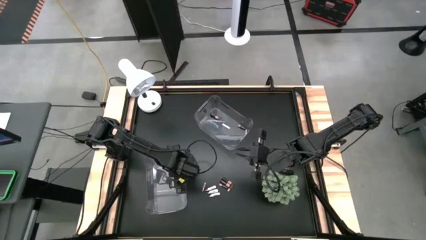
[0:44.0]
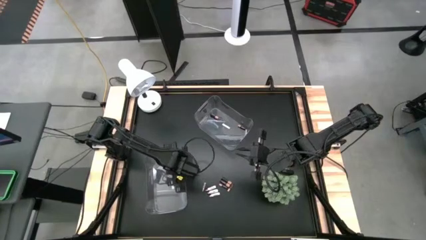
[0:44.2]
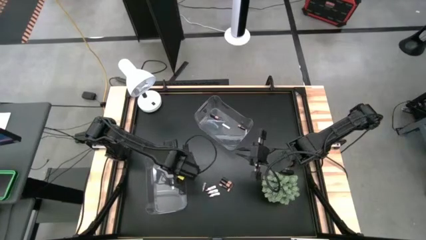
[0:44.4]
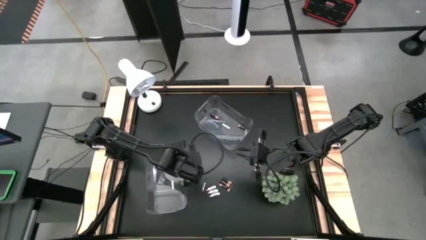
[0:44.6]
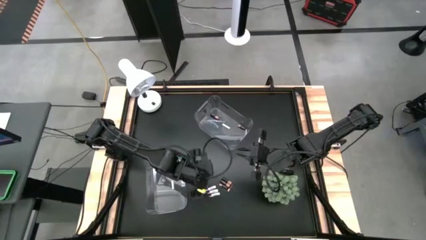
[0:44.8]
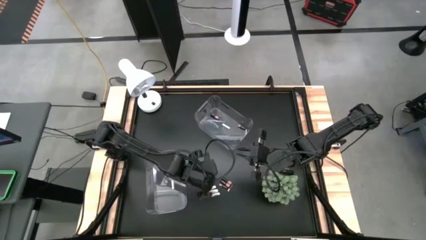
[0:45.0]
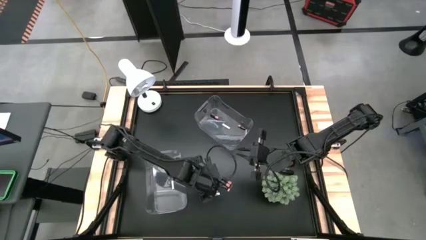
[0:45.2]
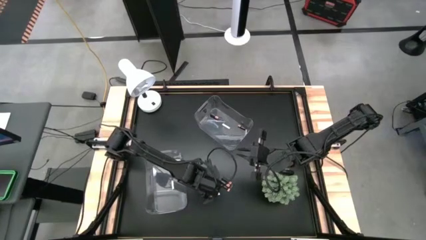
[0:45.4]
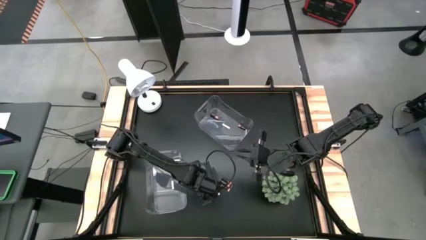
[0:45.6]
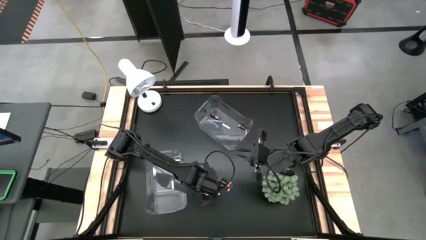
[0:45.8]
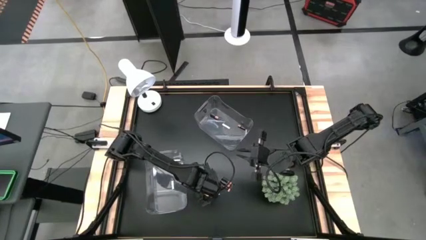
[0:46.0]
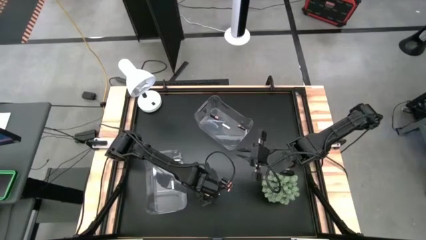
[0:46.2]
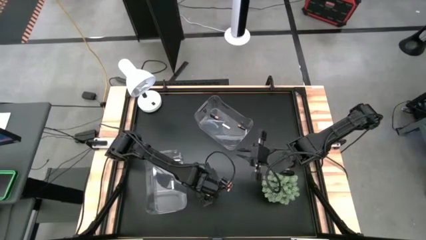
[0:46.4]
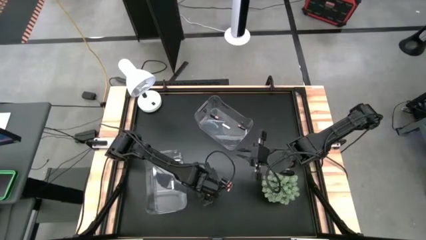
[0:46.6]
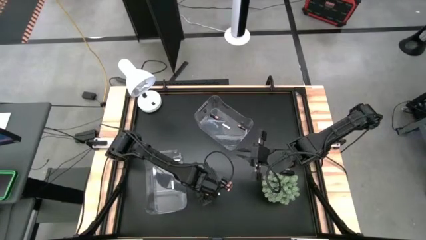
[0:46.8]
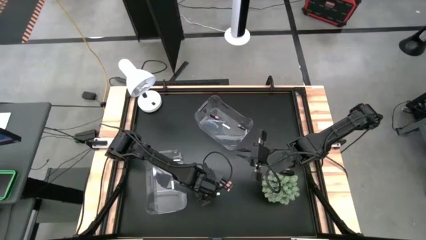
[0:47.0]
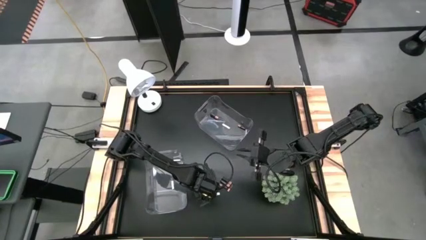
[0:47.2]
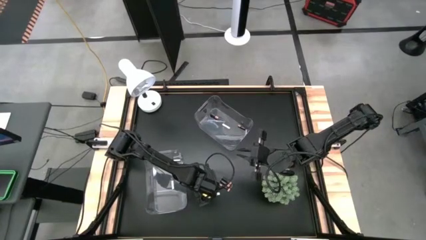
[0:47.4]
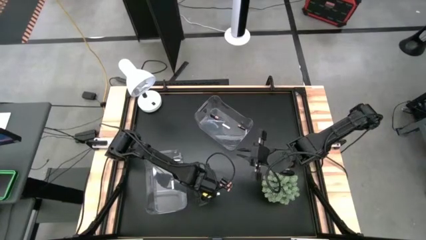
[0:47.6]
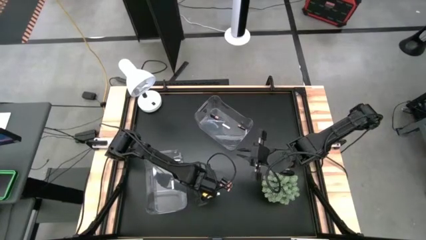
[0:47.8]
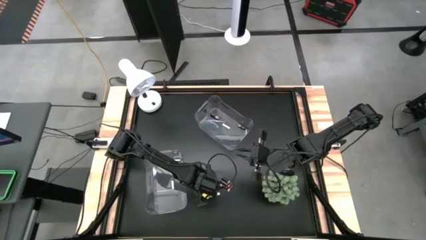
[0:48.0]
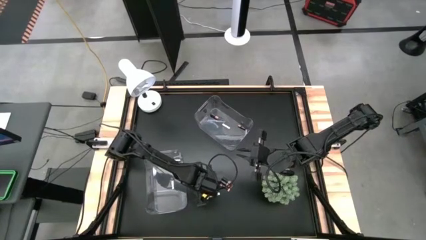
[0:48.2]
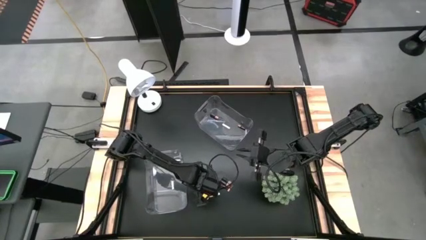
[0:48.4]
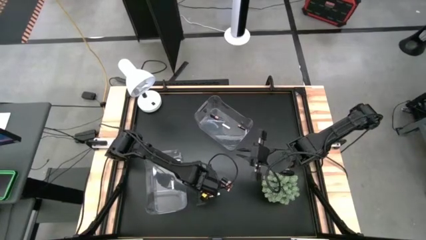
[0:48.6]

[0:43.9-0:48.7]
Task: Sort batteries
Put the silver battery into the bottom transparent bin

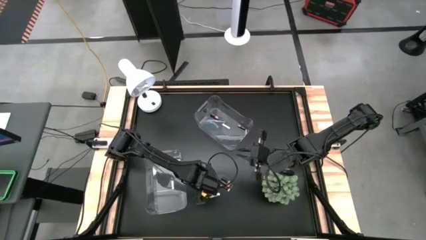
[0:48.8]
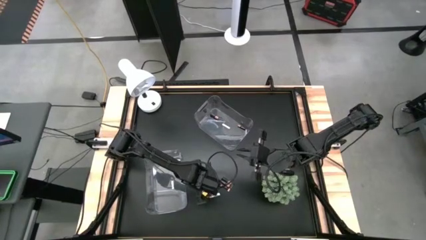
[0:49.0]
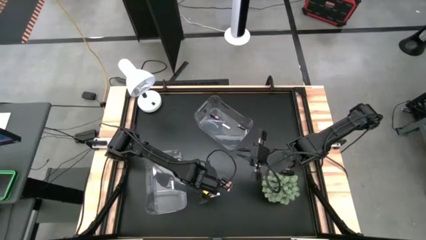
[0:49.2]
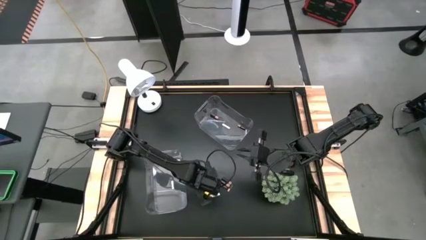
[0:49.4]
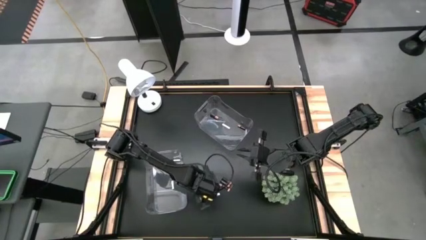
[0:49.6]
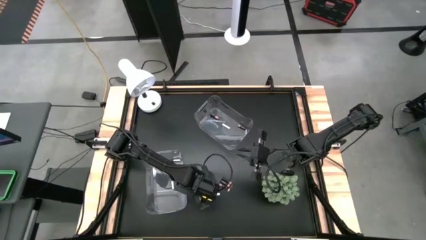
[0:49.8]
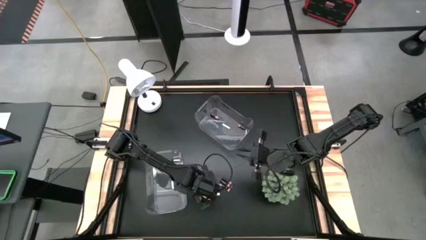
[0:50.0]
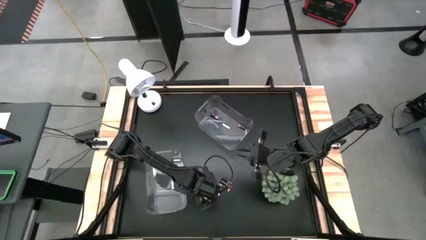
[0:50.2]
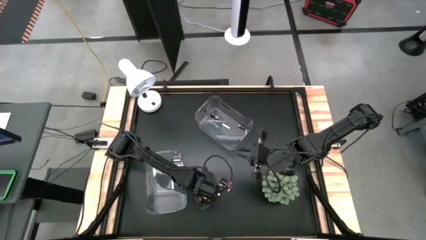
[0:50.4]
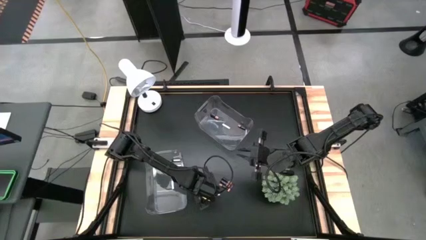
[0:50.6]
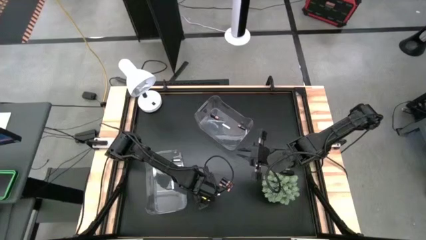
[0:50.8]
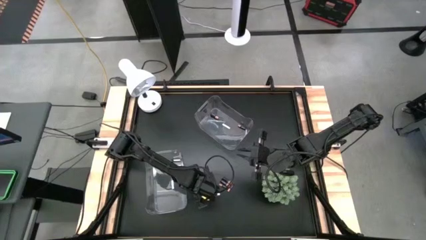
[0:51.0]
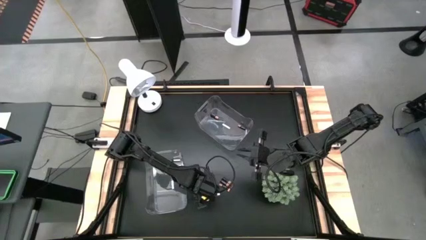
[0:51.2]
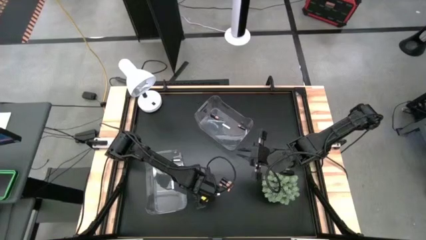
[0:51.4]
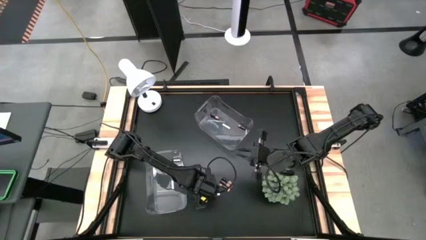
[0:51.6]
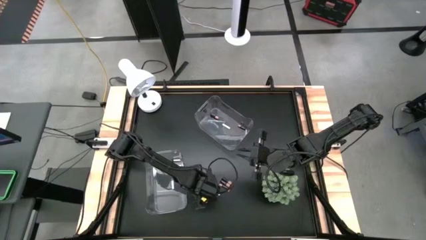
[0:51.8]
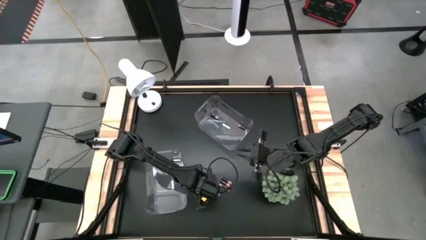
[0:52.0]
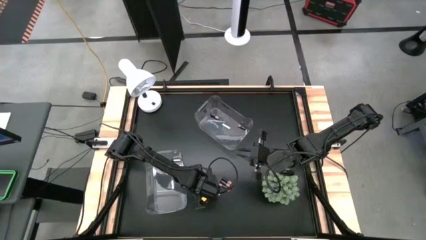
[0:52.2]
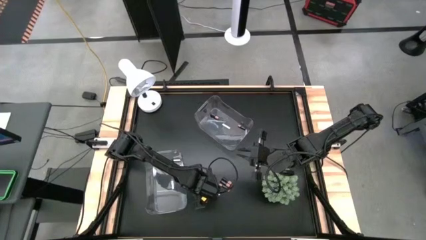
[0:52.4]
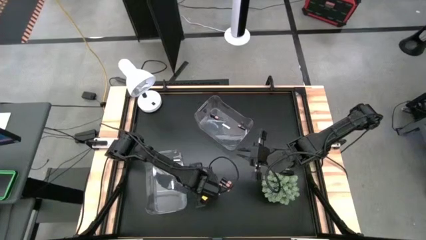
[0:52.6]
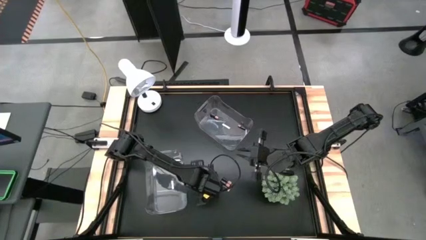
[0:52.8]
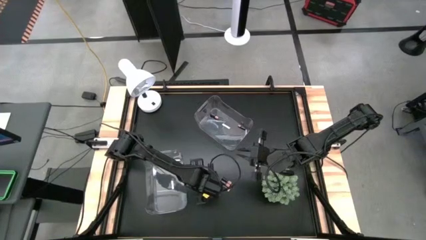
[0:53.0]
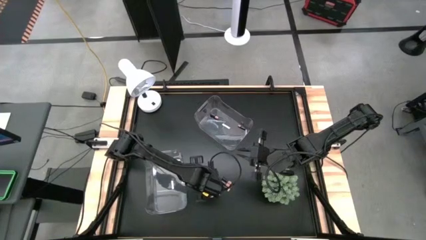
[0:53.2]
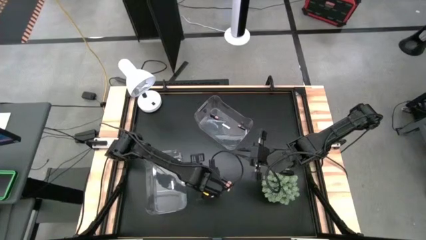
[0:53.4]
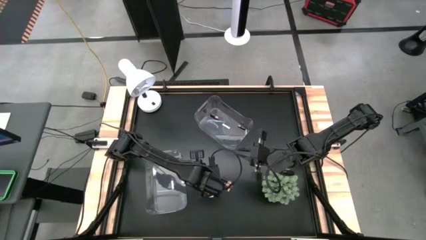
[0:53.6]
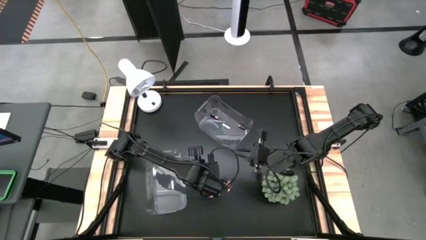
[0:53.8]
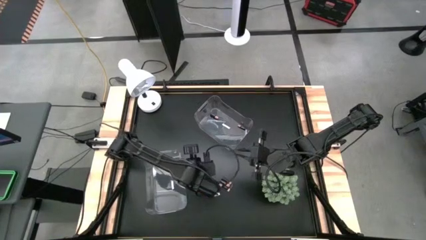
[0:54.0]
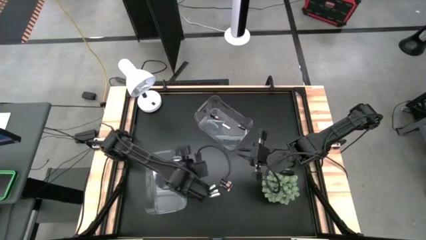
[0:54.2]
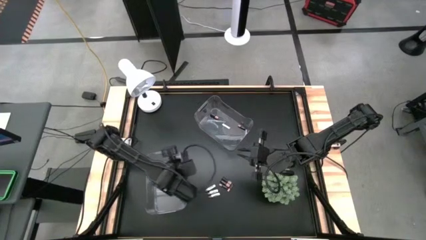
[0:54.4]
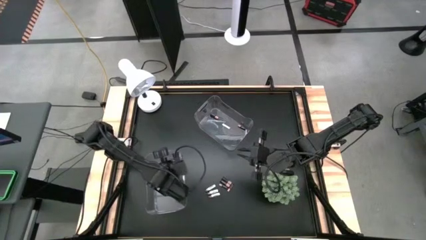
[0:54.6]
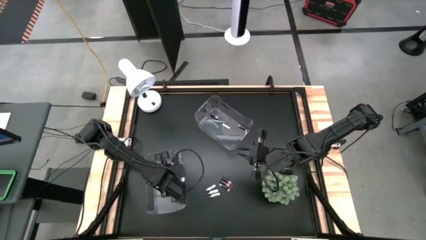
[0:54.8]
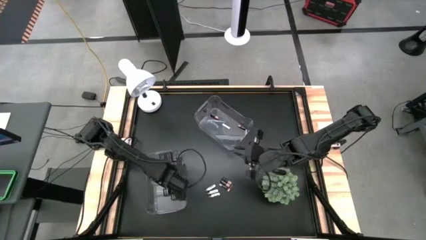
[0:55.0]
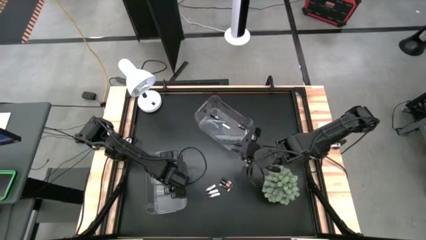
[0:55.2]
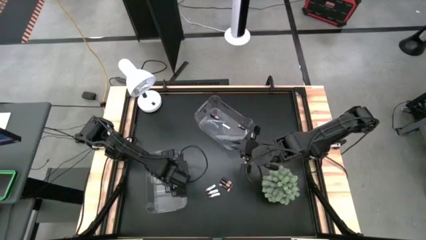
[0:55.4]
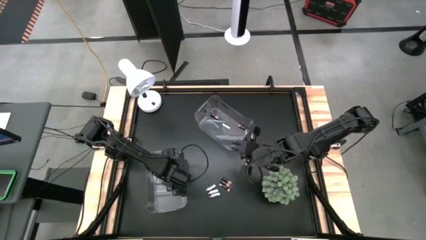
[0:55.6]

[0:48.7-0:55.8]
Put the silver battery into the bottom transparent bin

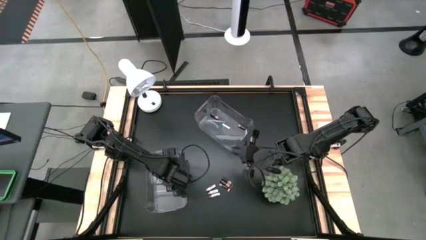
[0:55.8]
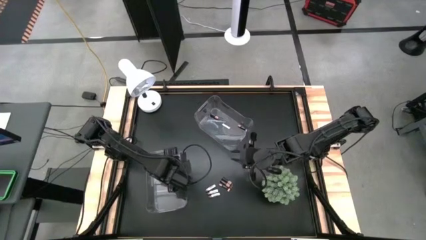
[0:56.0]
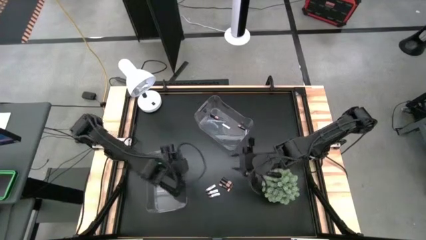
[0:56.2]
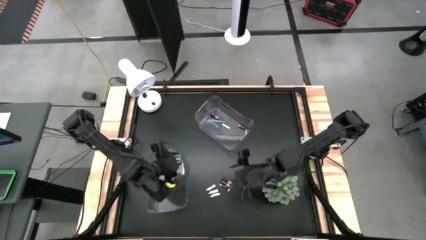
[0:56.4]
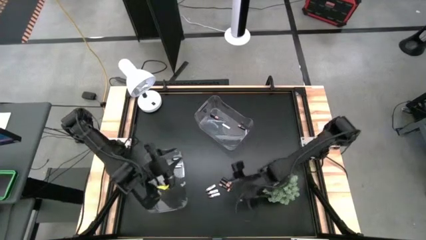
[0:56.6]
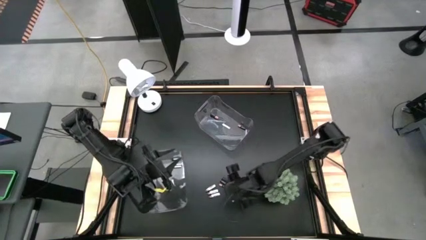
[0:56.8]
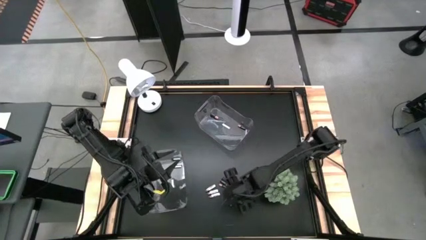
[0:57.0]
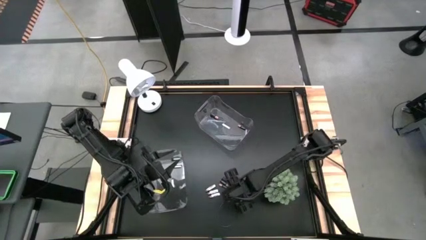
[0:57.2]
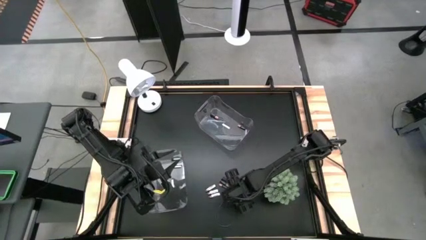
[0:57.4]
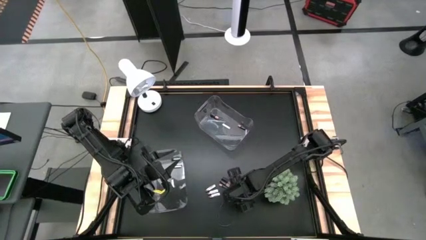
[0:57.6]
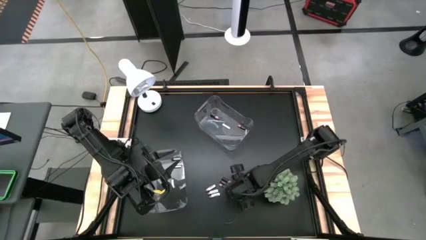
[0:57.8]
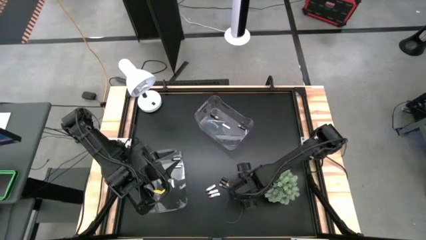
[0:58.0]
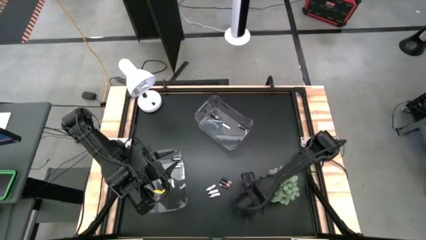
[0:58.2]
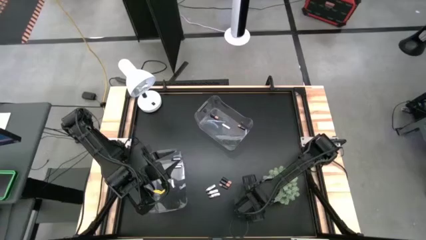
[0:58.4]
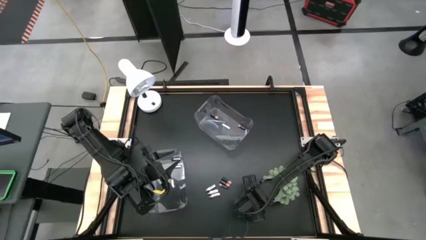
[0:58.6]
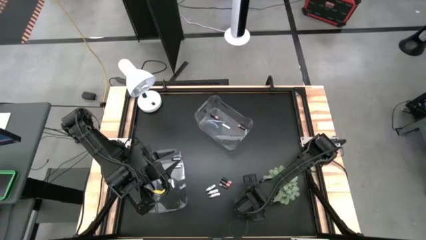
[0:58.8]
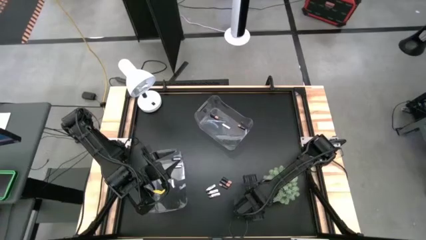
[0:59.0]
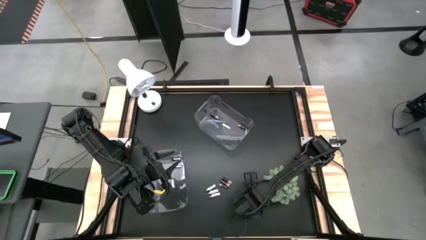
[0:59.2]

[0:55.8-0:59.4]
Put the black battery into the top transparent bin

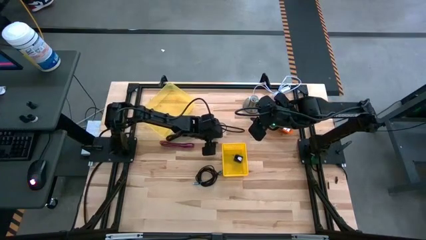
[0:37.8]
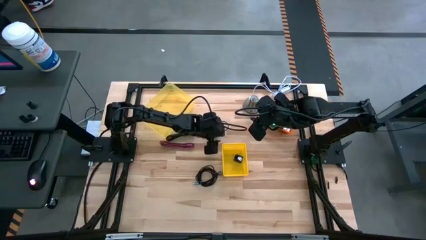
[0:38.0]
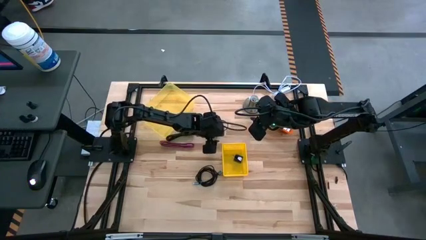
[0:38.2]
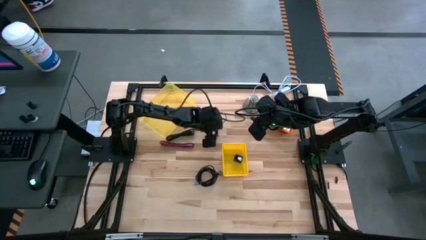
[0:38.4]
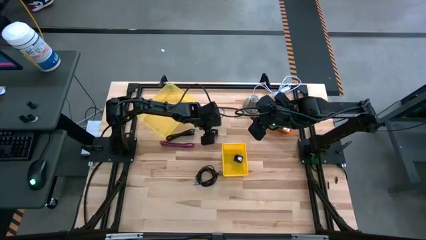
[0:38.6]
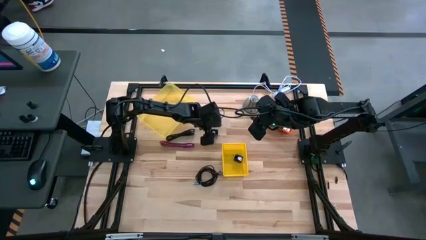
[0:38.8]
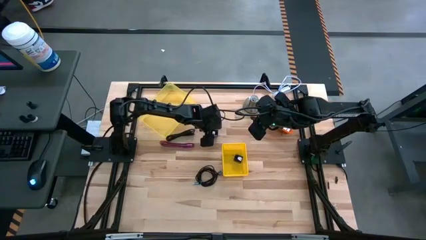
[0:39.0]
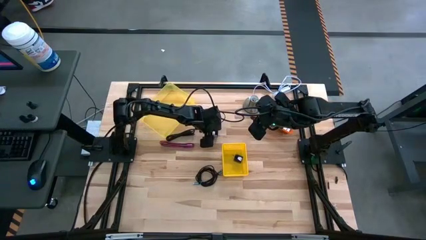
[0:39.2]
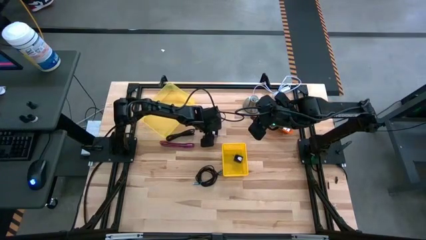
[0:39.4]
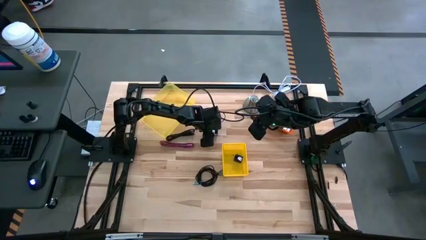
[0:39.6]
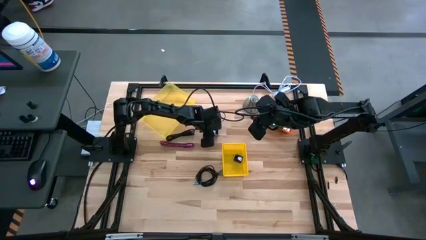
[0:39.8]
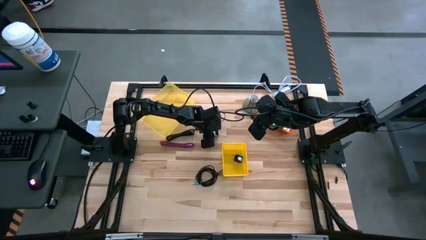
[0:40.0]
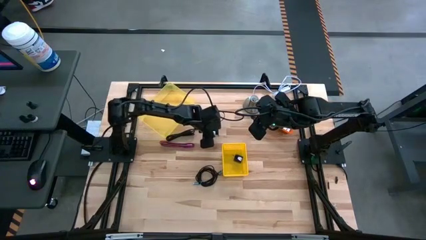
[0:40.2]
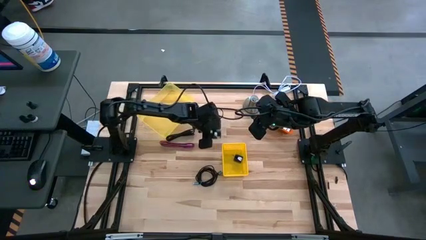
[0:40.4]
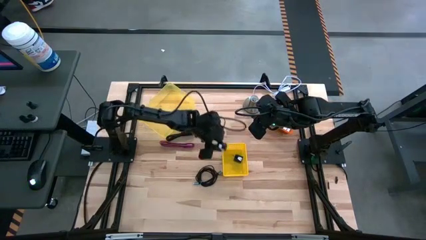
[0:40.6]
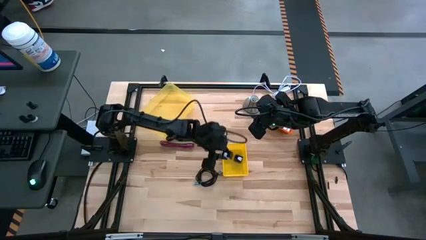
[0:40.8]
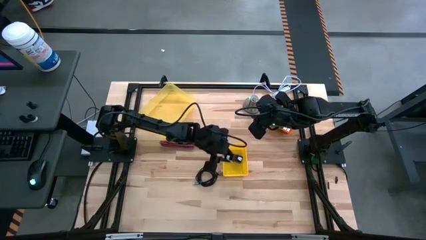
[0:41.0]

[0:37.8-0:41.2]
Task: Pick and place items into bin
Put the black charger adapter into the yellow bin
